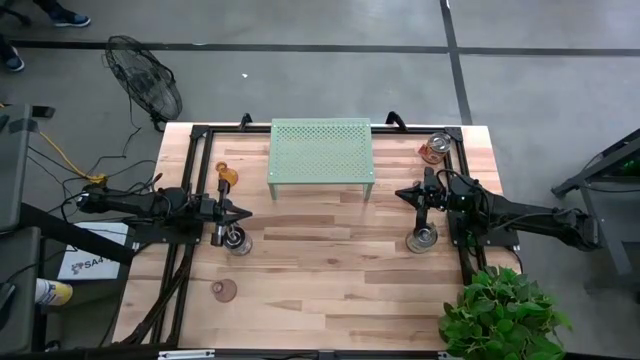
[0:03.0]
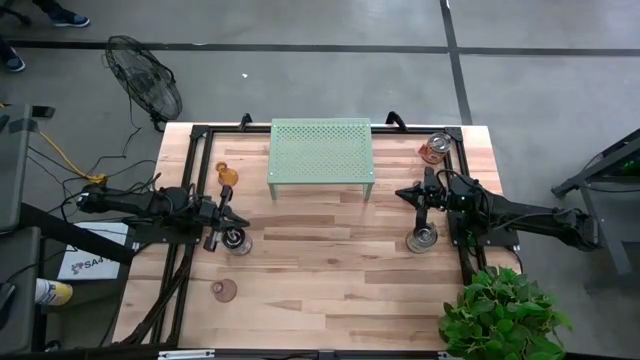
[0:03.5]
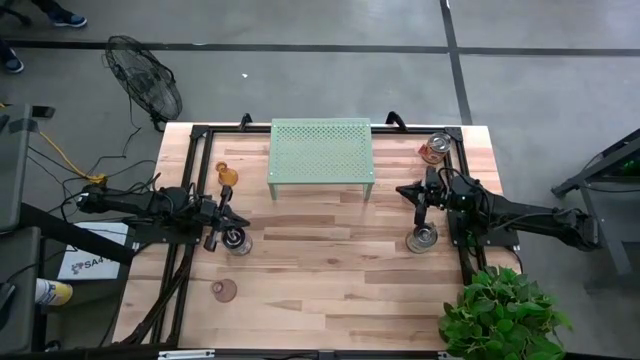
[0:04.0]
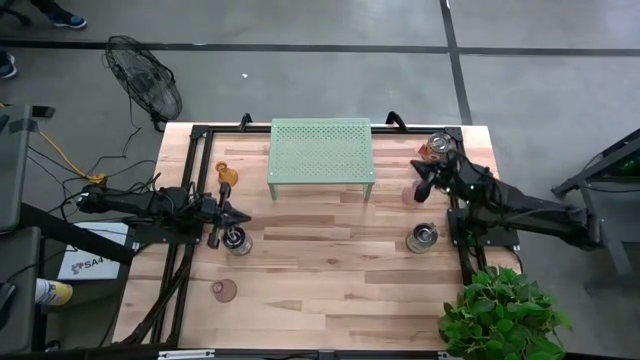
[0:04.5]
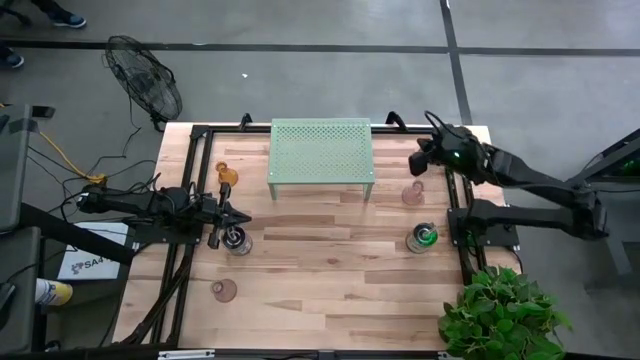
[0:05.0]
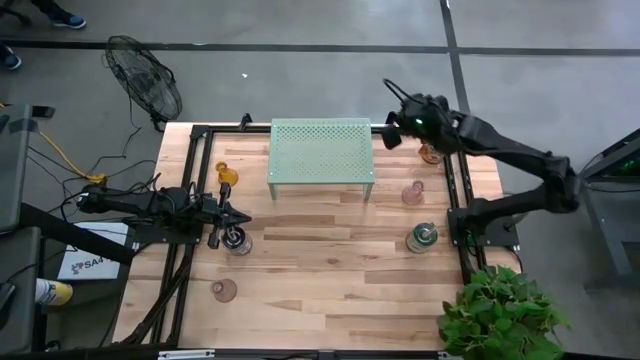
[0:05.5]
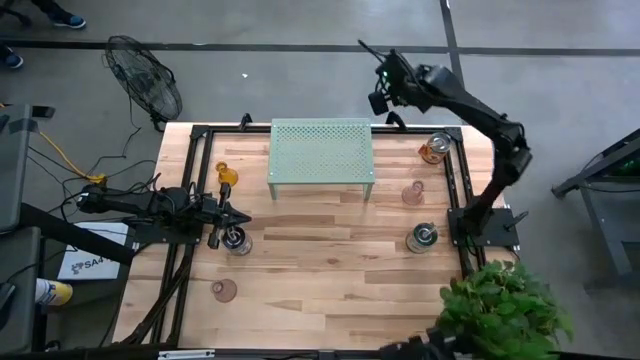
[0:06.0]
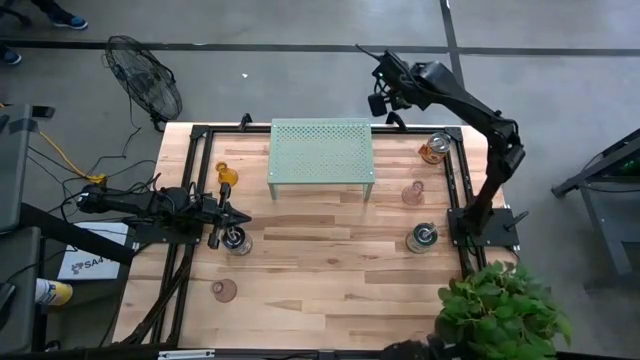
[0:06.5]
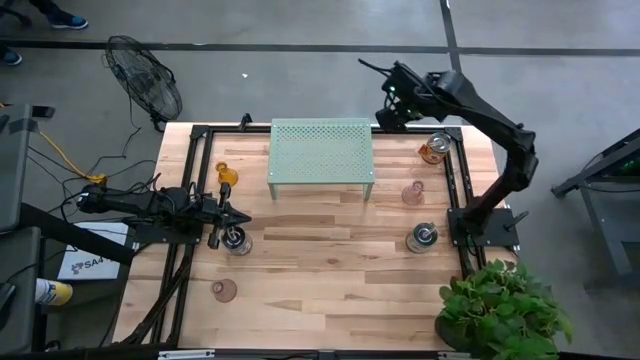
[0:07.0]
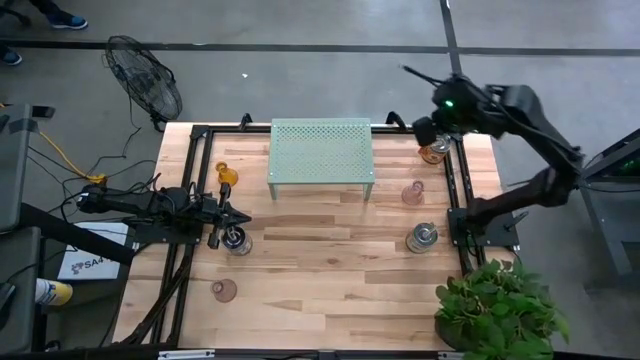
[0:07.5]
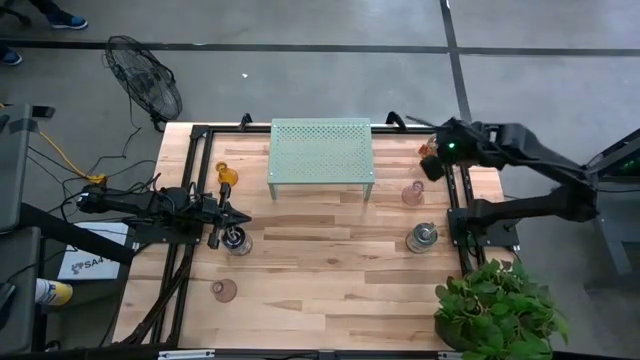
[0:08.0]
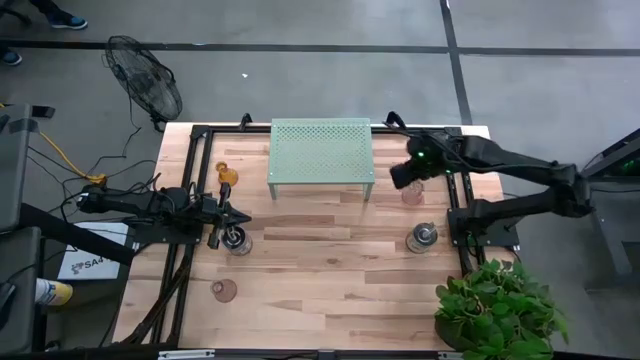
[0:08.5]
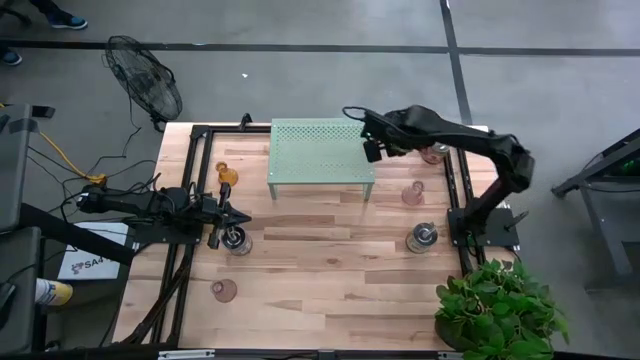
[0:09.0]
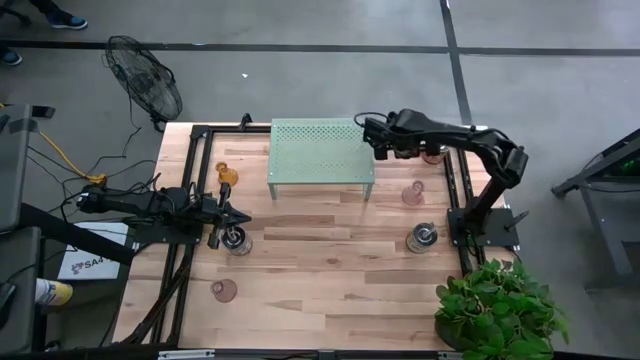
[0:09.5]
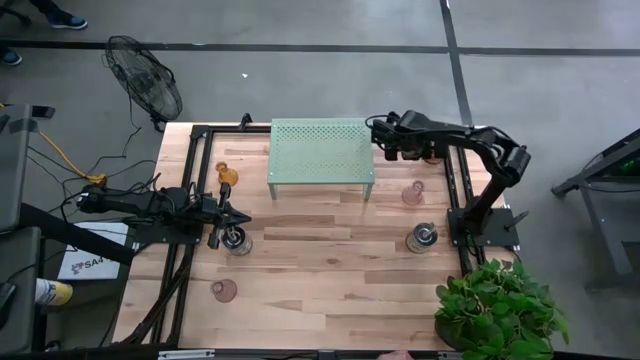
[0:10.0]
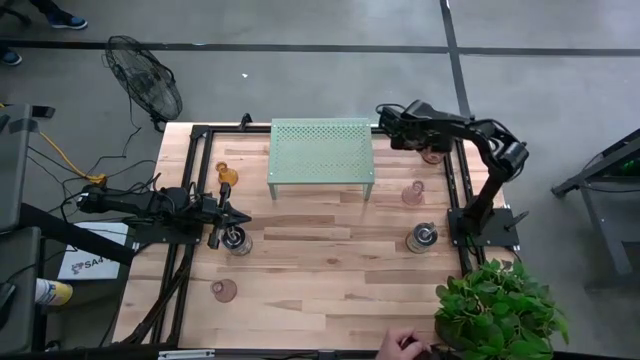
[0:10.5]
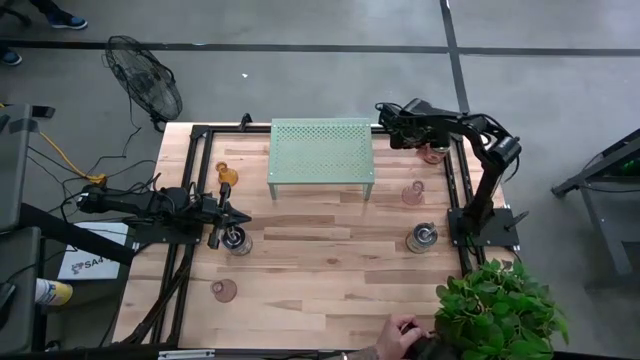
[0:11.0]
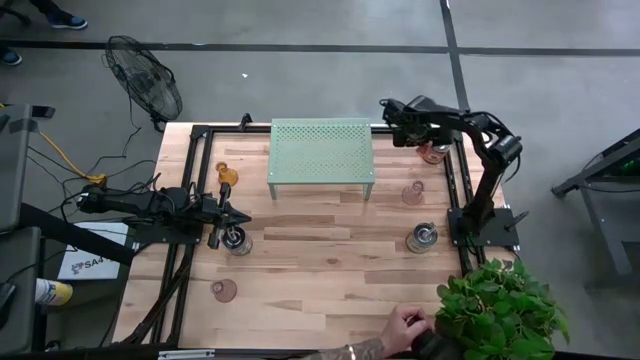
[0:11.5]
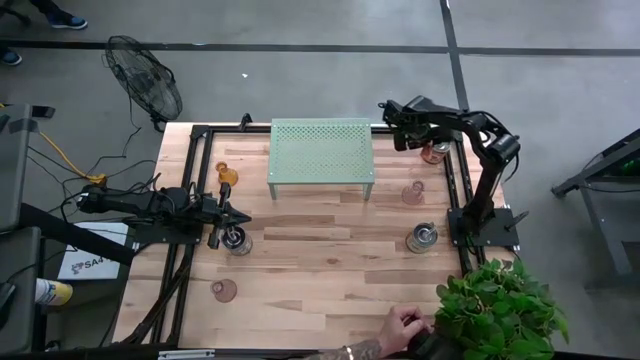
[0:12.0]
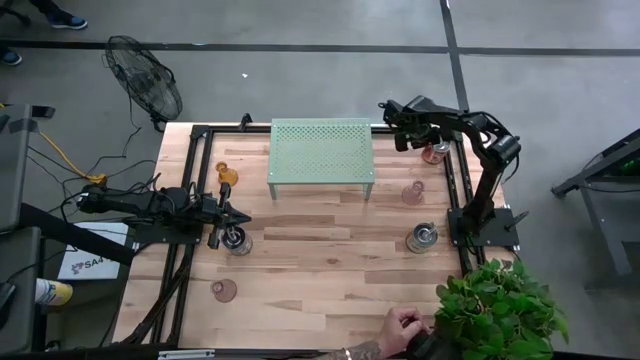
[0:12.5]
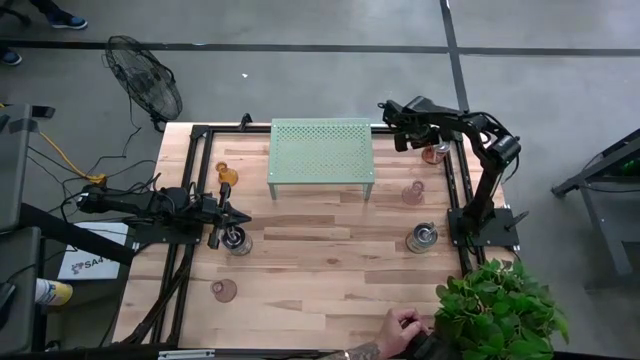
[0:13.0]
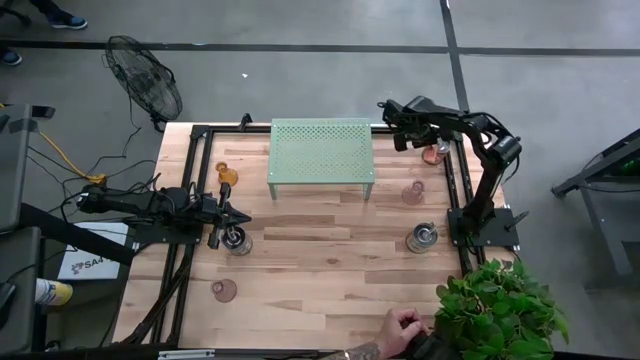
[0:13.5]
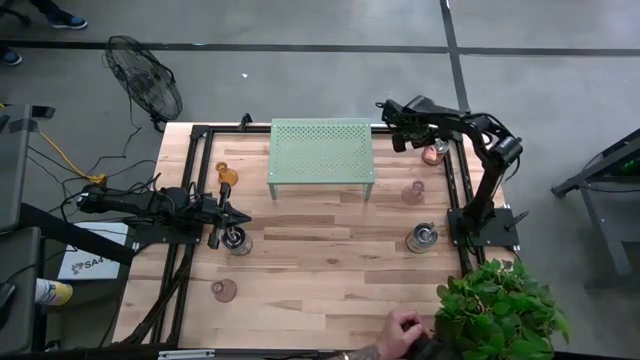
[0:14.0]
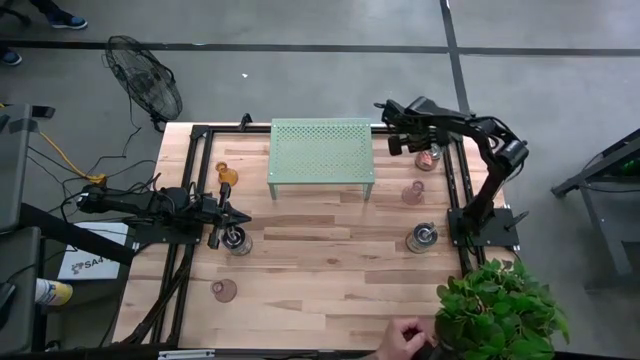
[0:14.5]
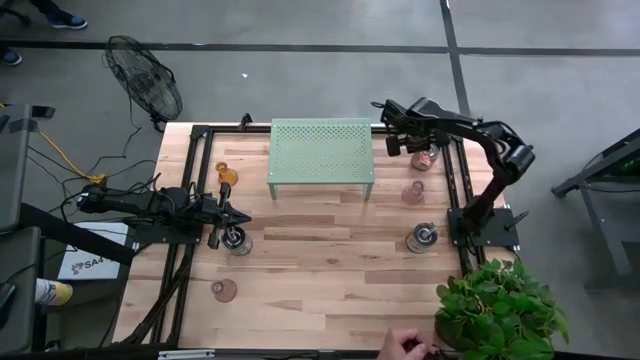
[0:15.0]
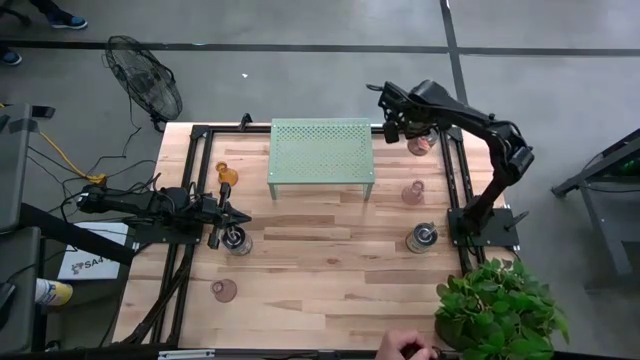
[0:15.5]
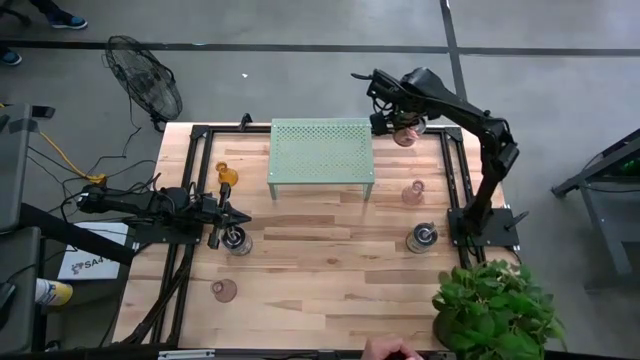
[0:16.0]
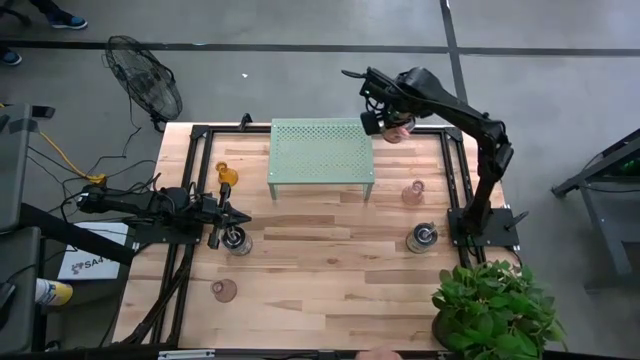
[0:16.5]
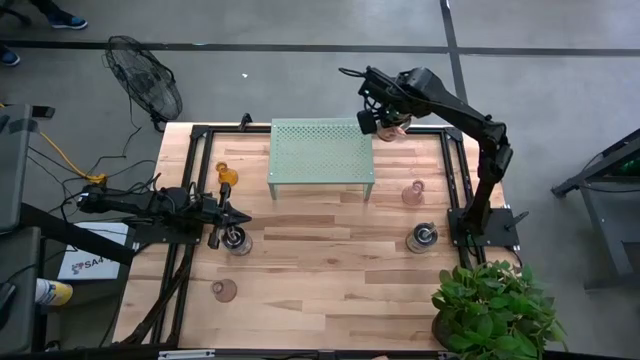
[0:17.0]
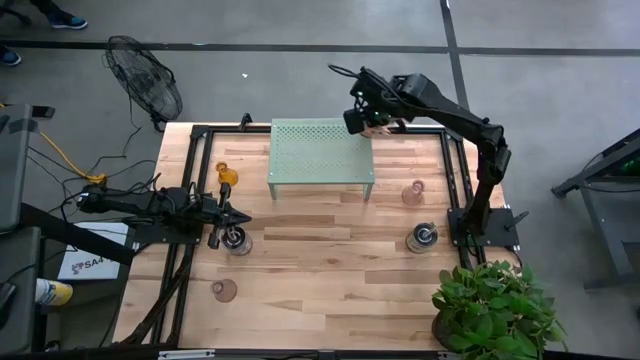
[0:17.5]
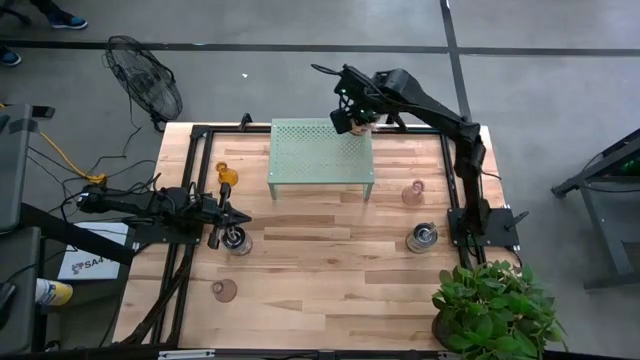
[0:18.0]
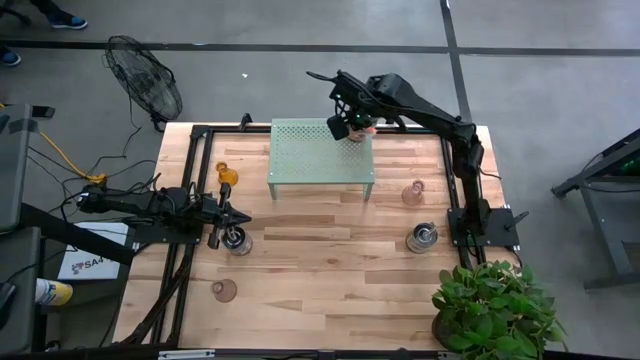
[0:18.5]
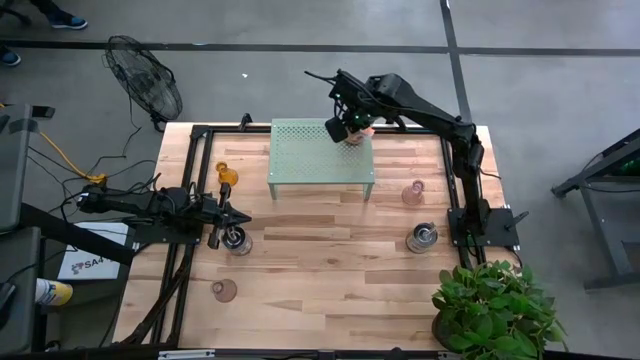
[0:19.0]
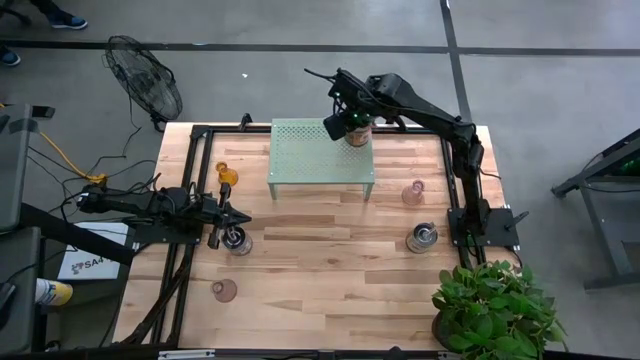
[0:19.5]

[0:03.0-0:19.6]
Task: Pick & Place candle stick holders
Put the top silver scented candle on the shelf

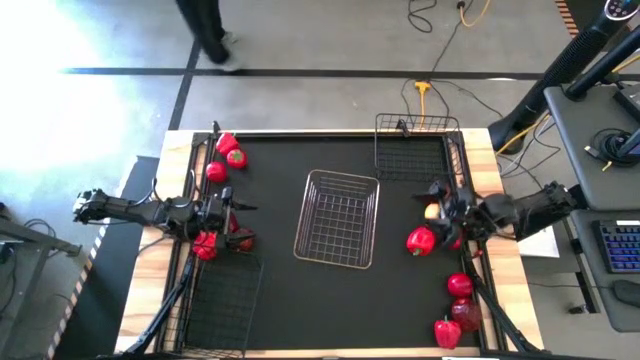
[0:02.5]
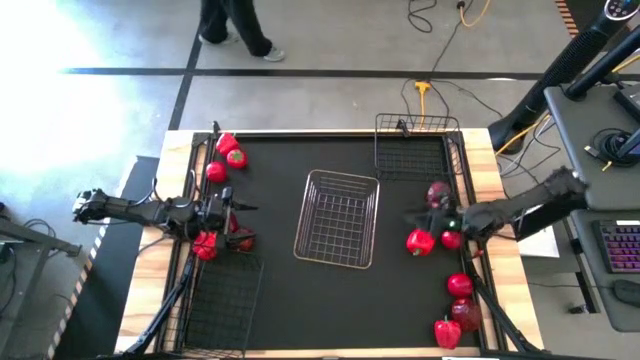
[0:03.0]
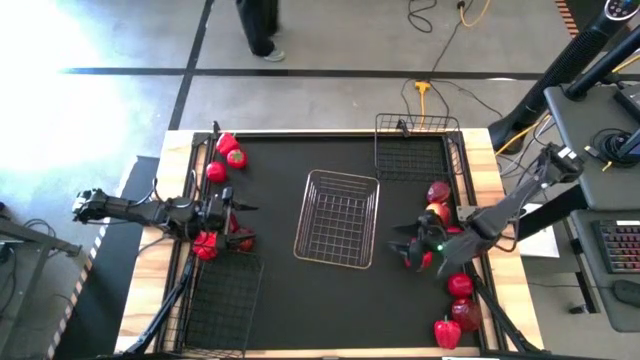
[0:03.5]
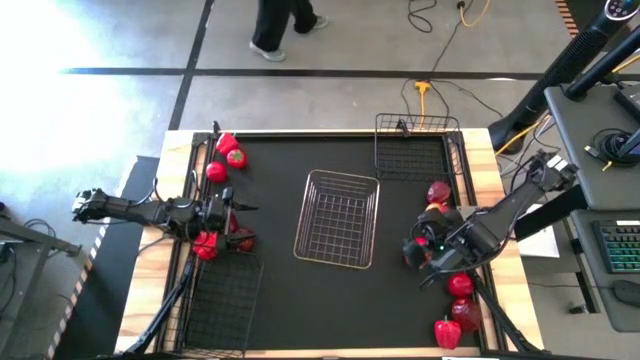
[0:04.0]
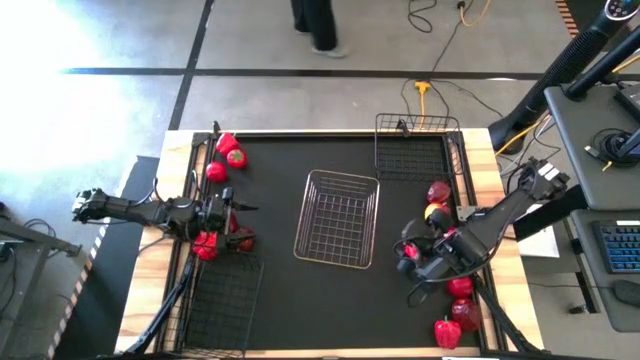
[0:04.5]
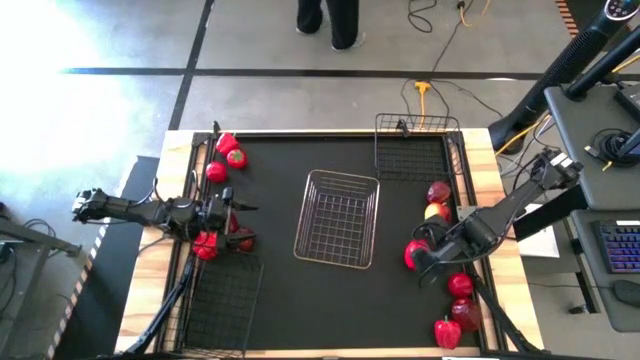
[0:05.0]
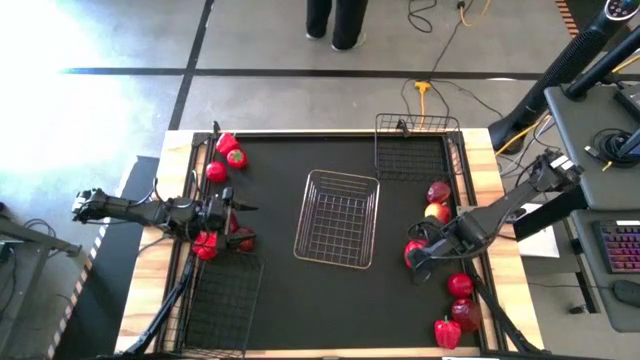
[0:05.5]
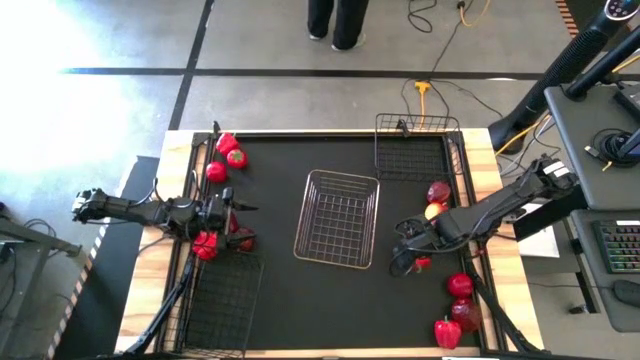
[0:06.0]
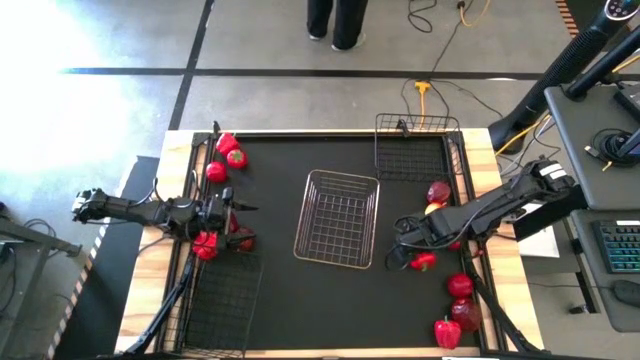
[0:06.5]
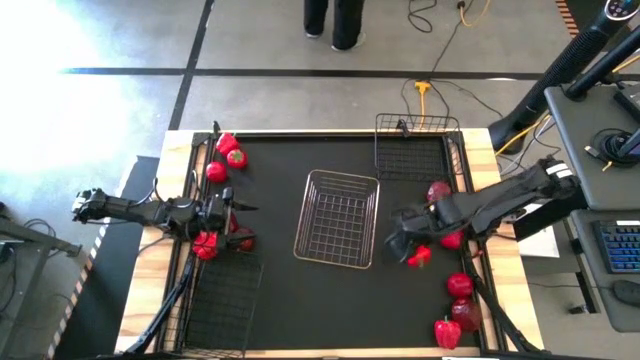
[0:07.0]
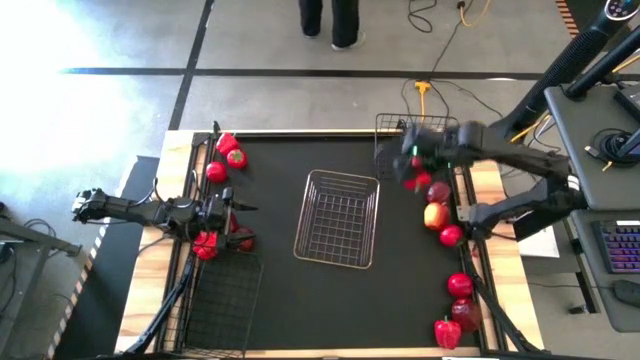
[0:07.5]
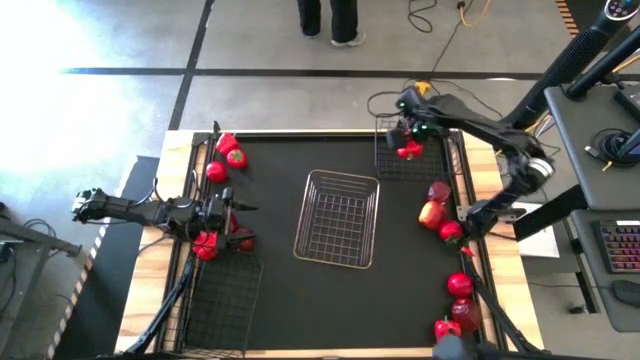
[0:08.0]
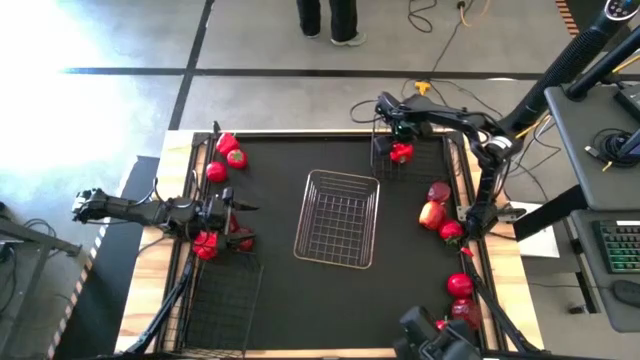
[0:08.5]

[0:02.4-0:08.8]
Task: Sort produce into baskets
Put the red bell pepper into the top black wire basket
